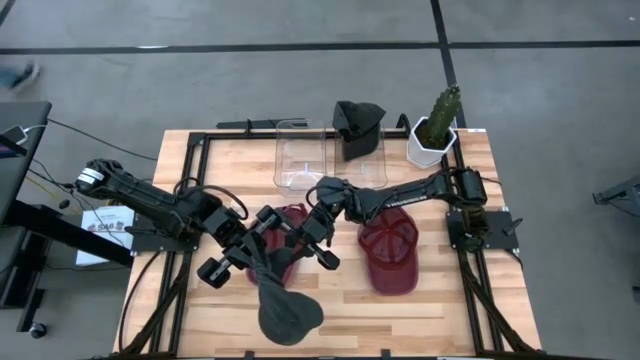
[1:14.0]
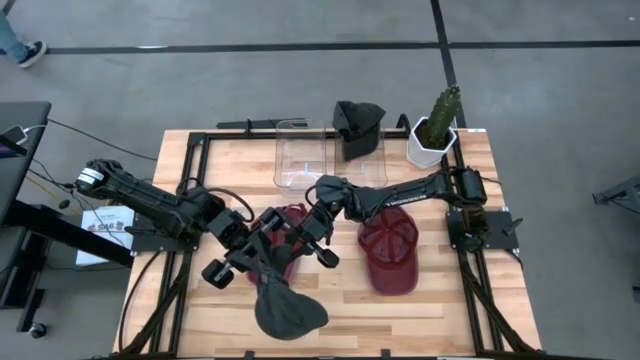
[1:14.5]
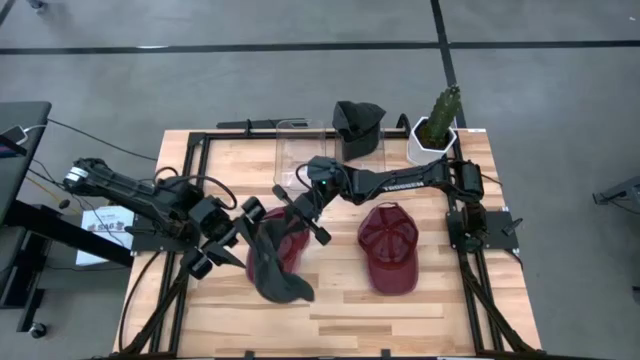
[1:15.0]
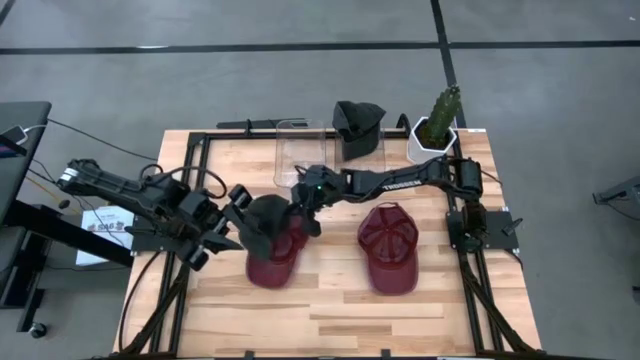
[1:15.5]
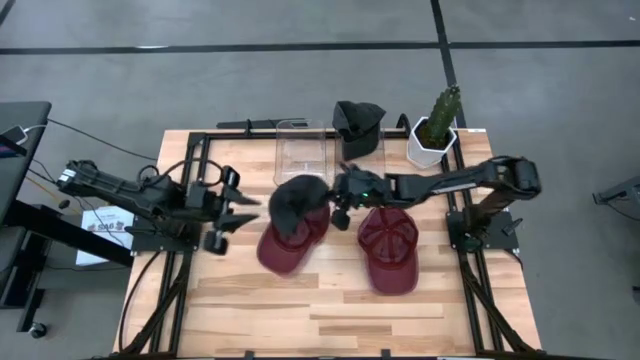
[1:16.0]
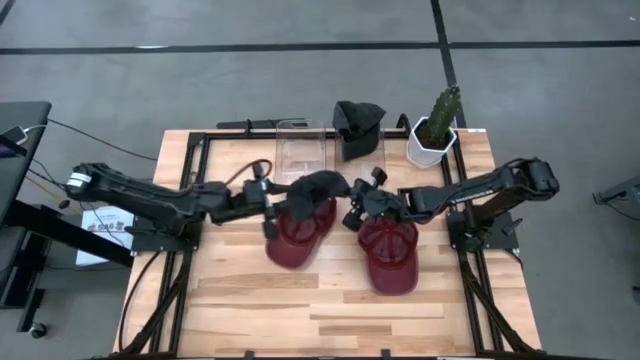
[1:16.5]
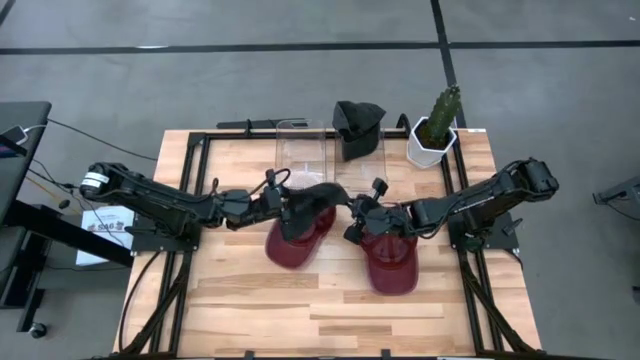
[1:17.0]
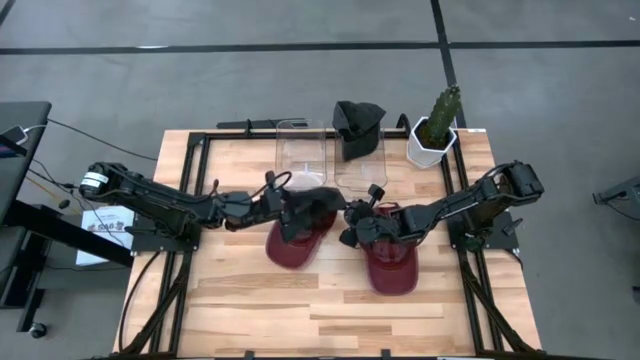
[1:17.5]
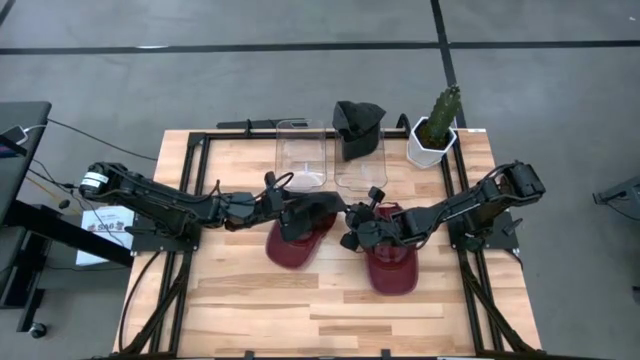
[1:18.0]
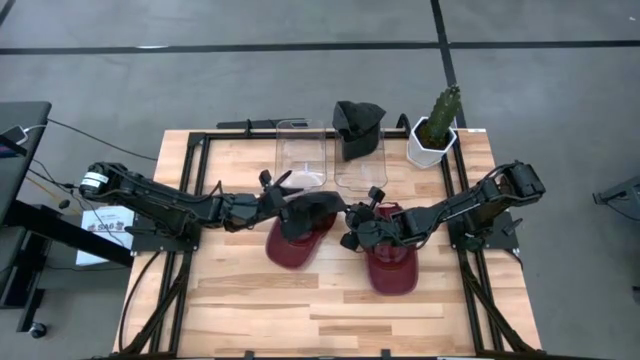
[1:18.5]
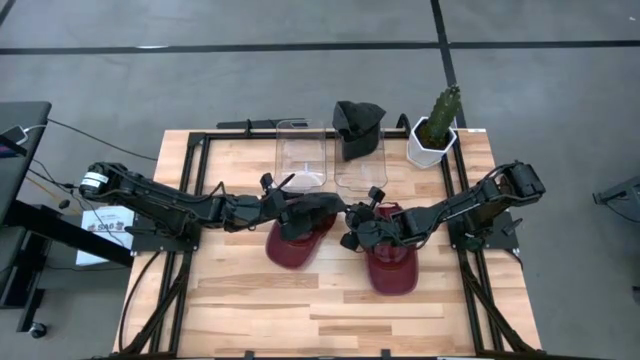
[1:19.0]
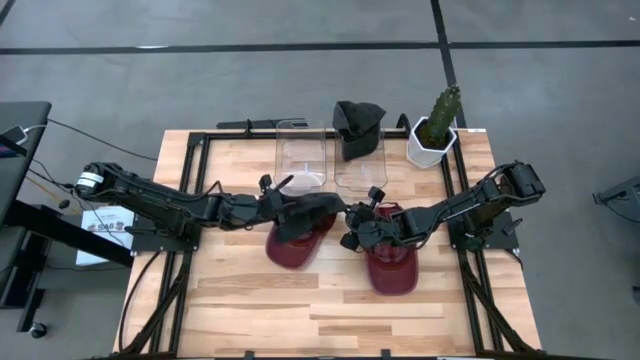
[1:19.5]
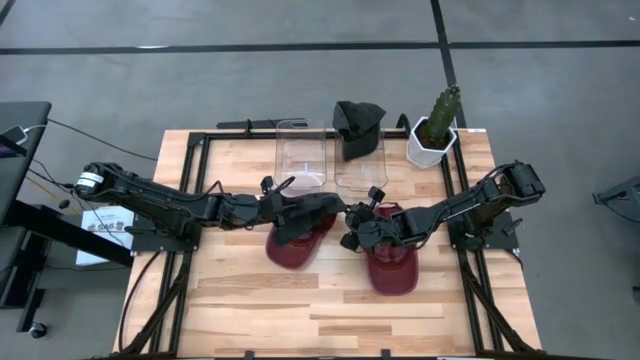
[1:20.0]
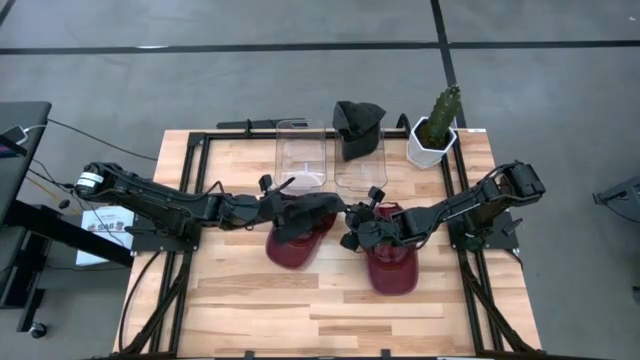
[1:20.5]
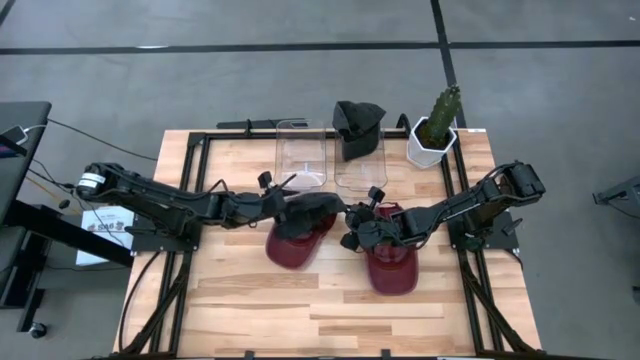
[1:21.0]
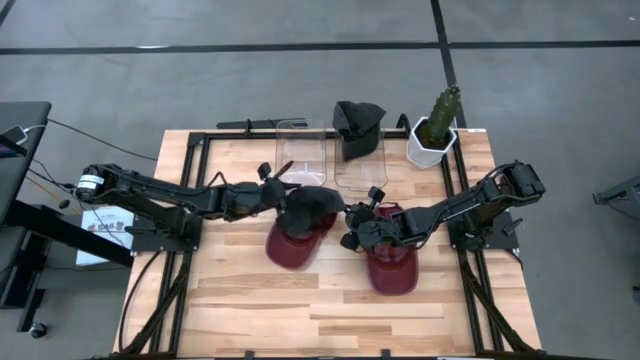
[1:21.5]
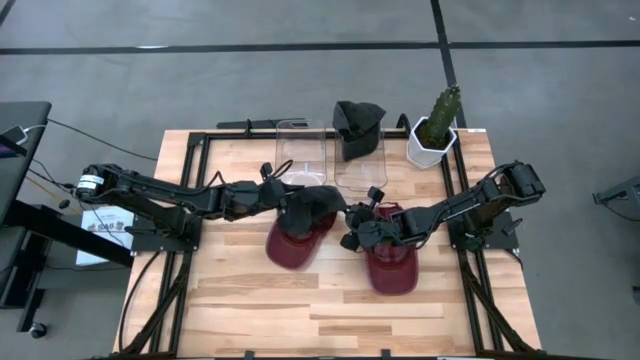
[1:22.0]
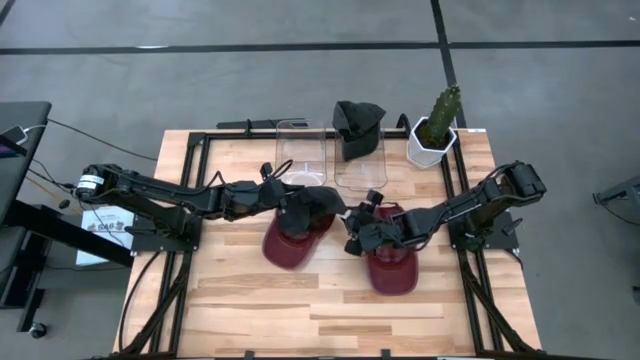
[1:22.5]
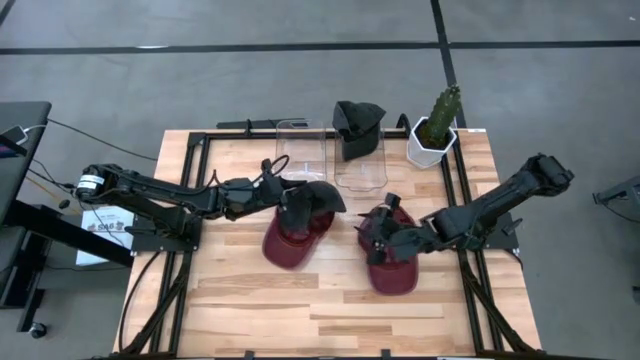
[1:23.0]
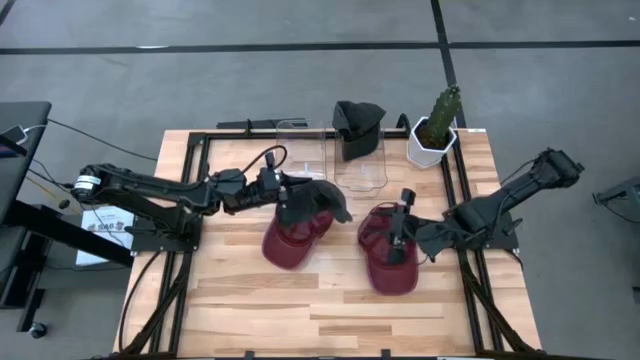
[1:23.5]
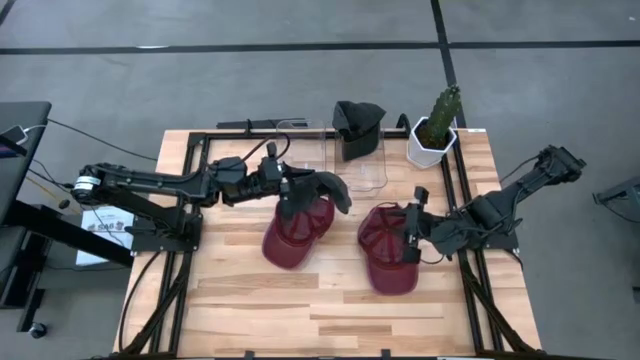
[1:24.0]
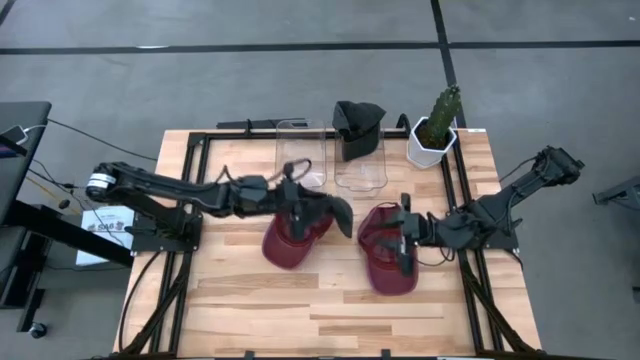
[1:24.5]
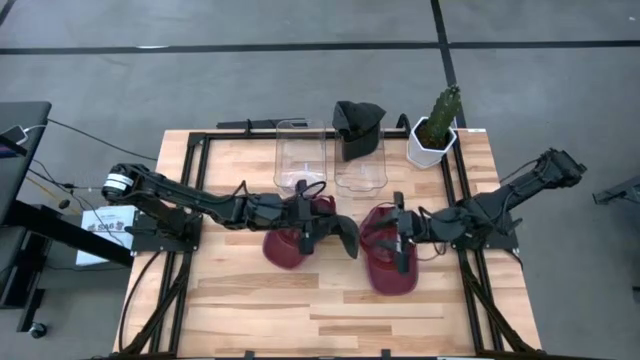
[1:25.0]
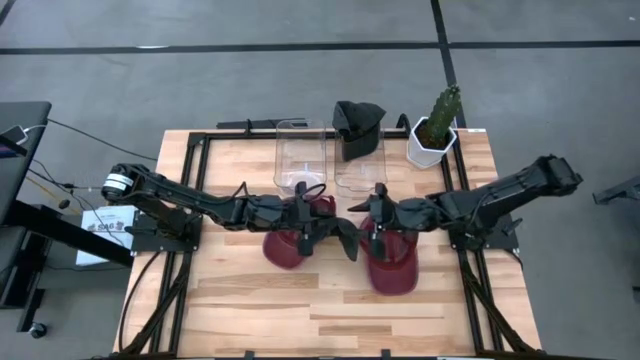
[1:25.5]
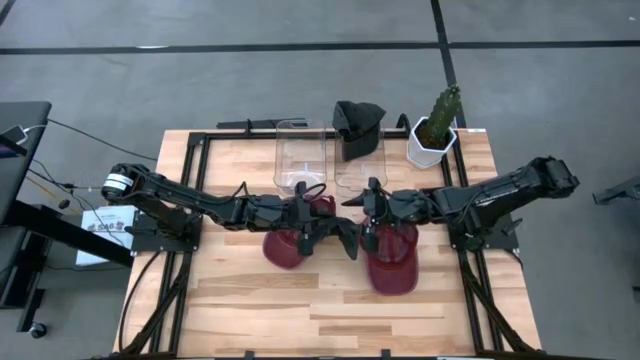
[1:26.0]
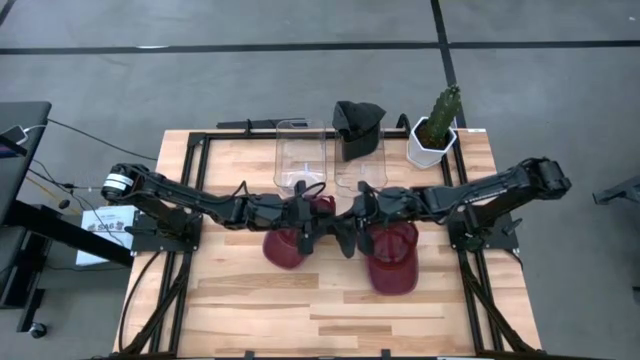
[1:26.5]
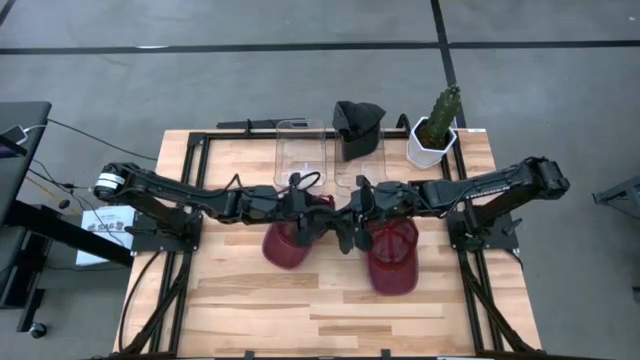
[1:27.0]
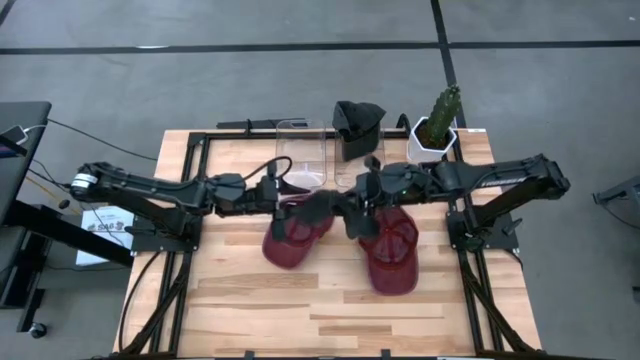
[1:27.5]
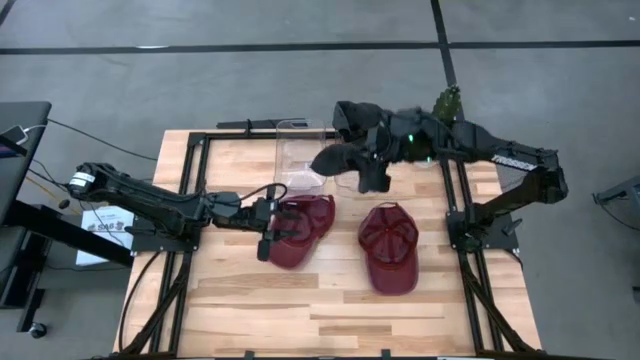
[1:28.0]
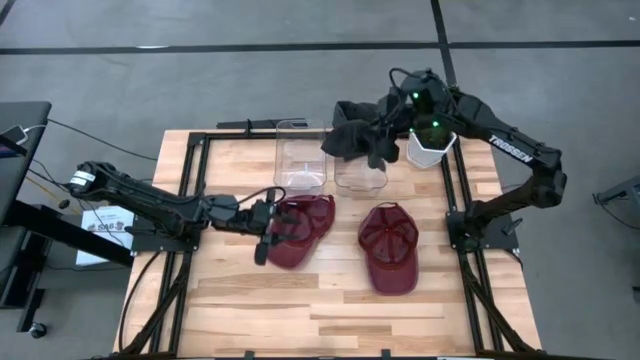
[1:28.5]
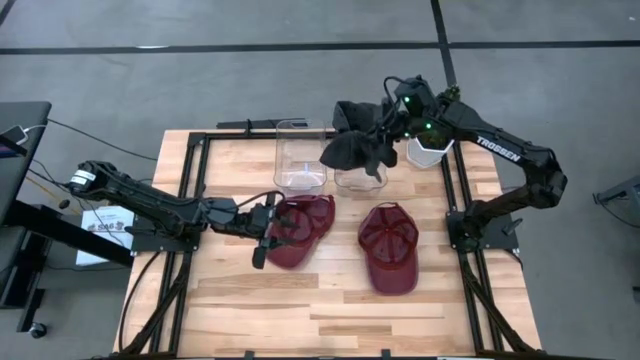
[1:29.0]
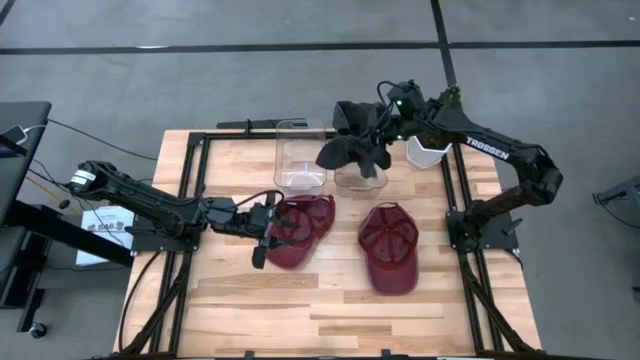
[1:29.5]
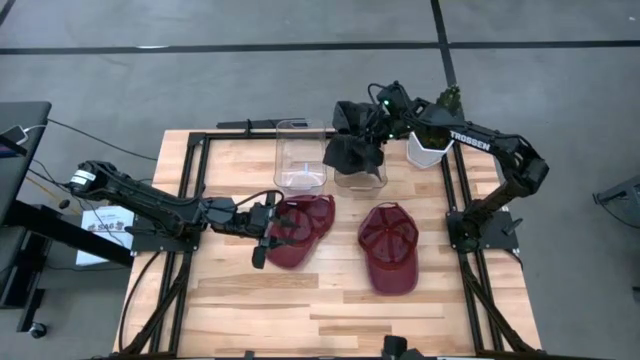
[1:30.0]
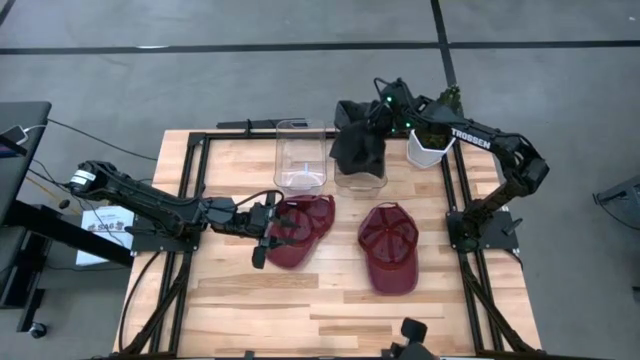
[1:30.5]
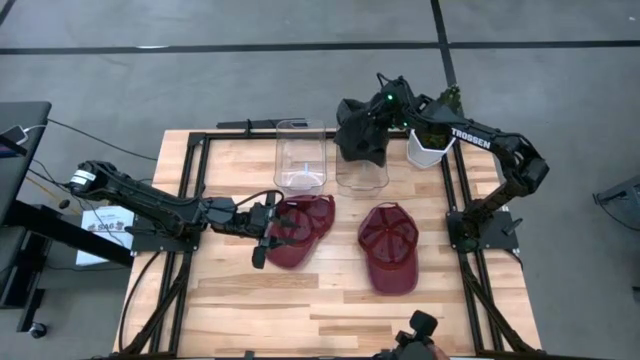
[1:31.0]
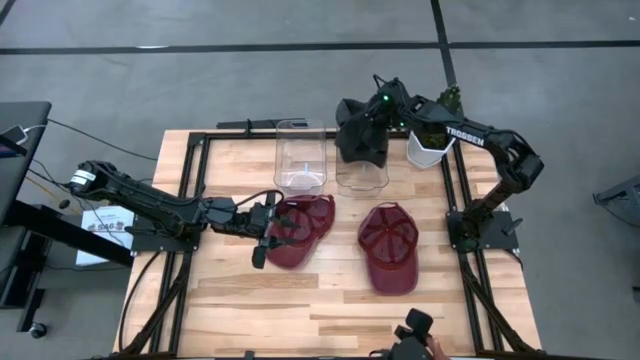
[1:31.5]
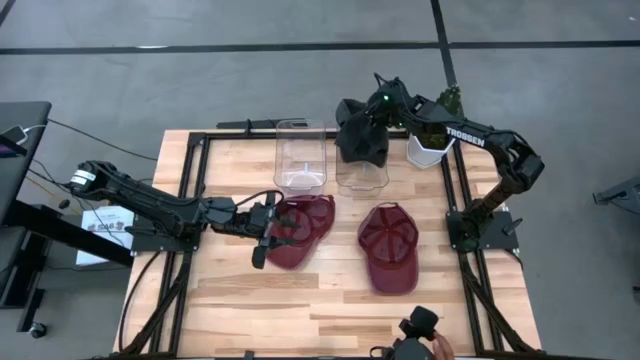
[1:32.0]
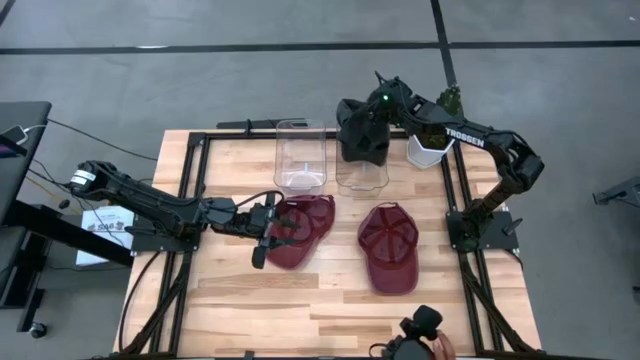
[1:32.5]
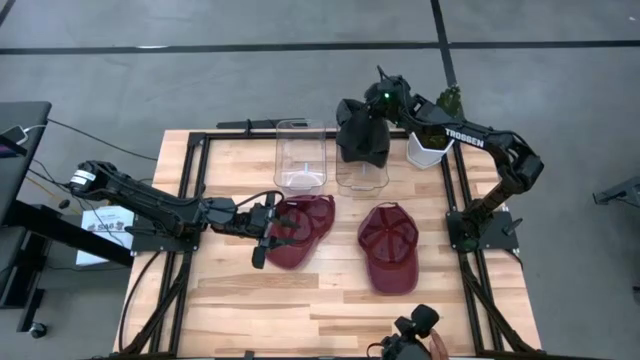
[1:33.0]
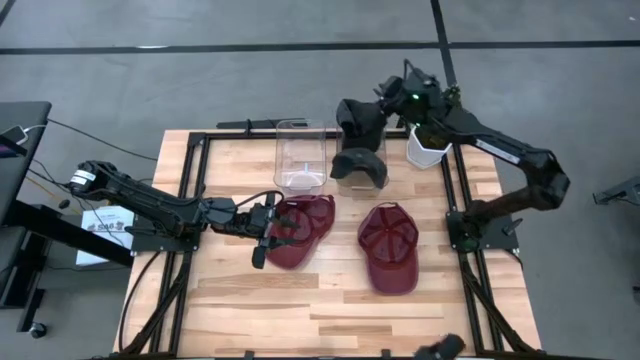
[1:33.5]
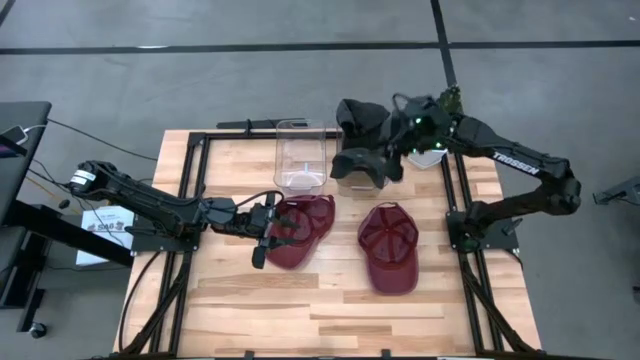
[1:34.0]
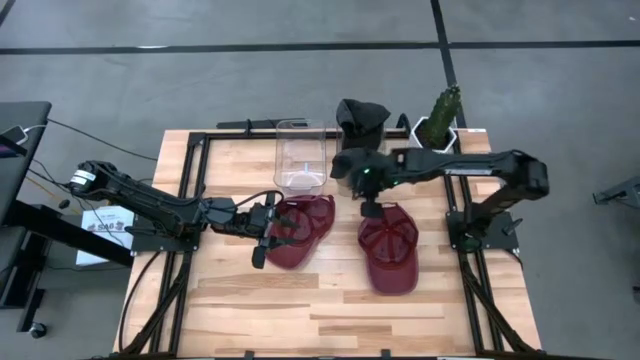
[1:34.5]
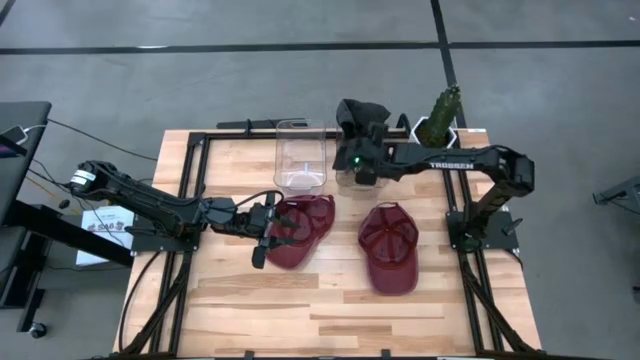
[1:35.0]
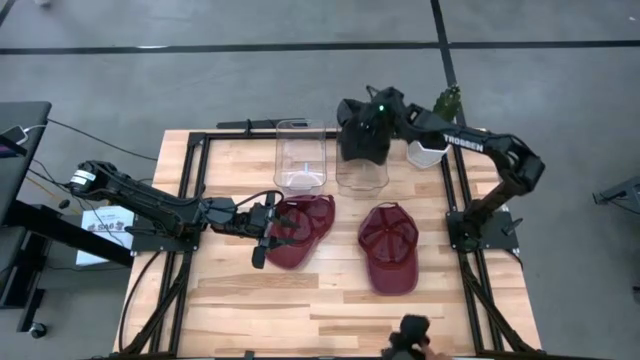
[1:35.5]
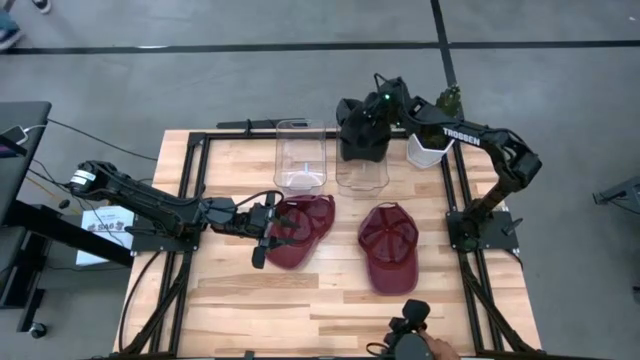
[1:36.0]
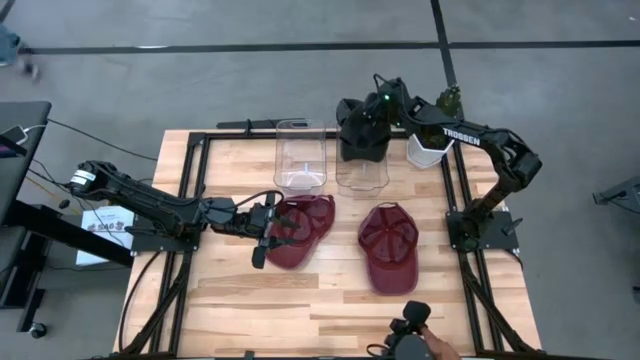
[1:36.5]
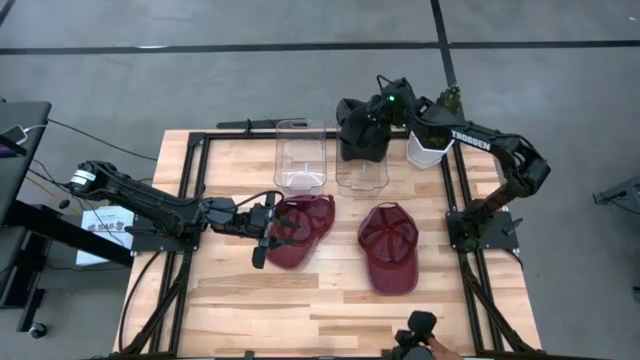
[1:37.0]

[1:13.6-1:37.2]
Task: Pick & Place hat
Put the black cap into the right transparent bin
